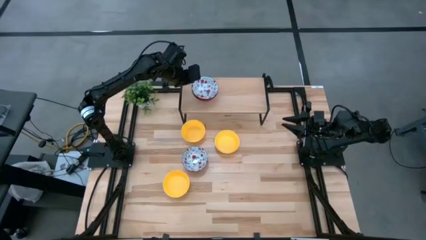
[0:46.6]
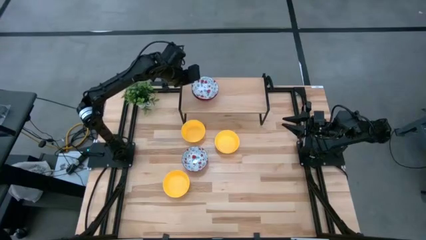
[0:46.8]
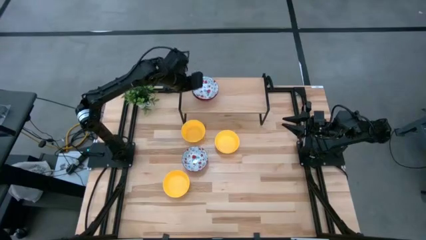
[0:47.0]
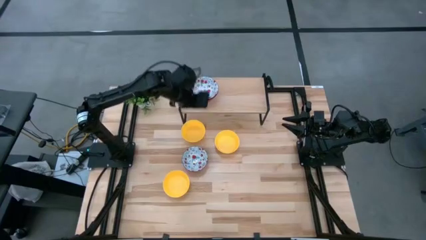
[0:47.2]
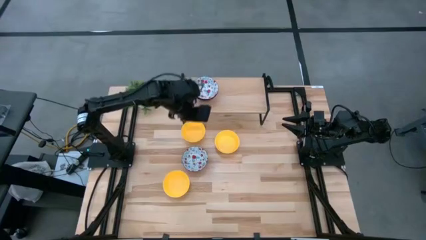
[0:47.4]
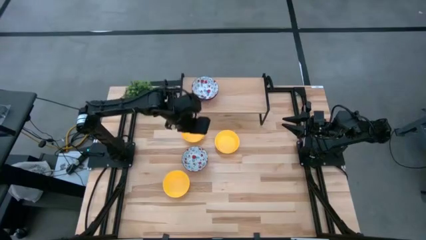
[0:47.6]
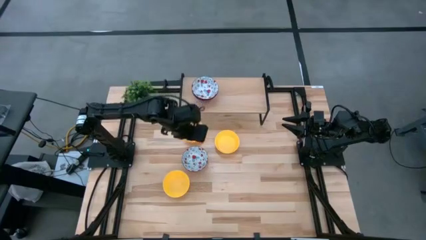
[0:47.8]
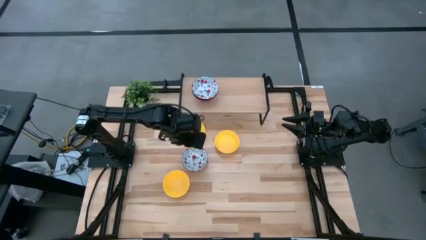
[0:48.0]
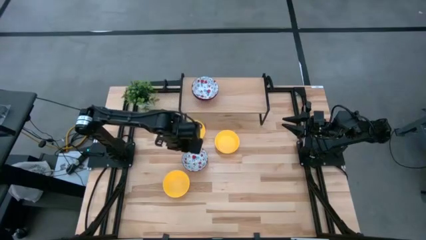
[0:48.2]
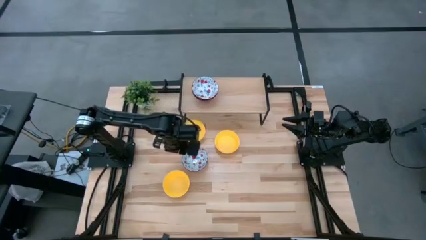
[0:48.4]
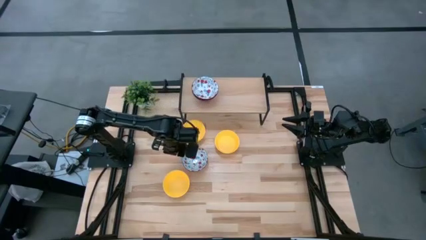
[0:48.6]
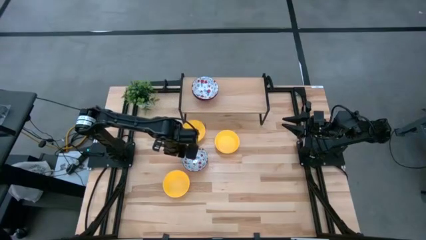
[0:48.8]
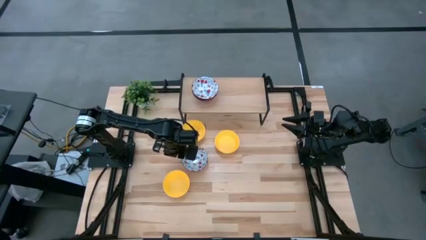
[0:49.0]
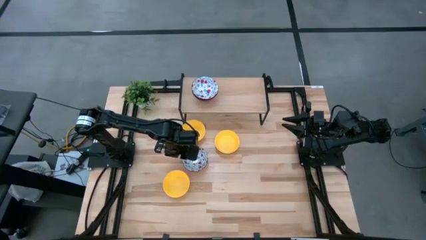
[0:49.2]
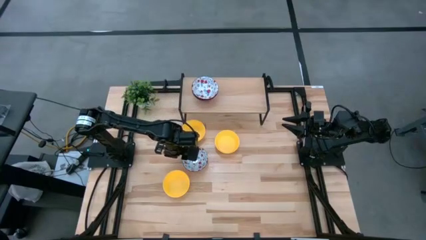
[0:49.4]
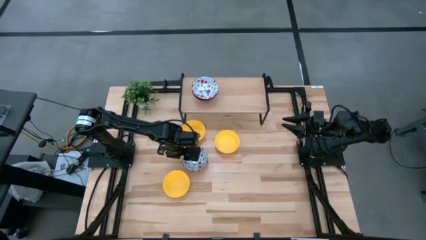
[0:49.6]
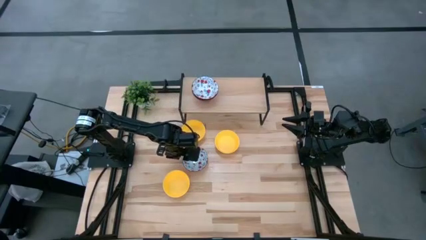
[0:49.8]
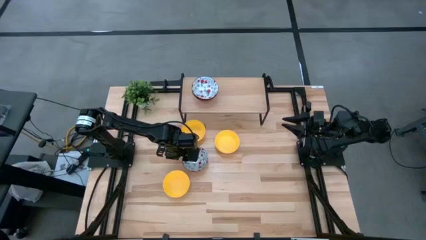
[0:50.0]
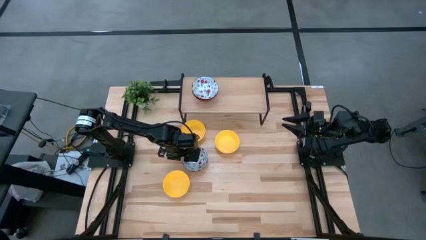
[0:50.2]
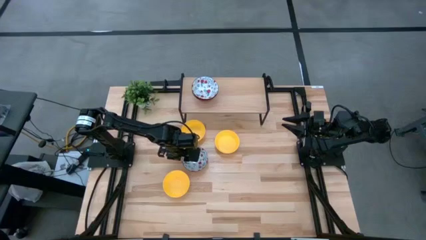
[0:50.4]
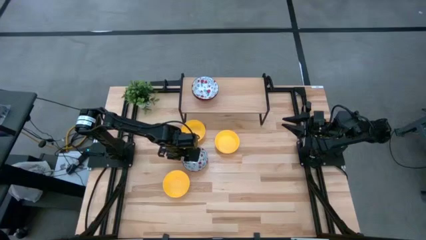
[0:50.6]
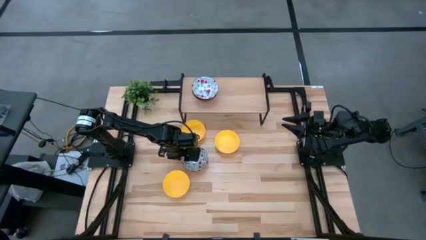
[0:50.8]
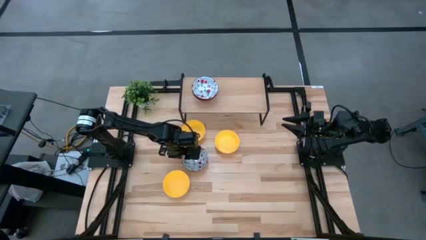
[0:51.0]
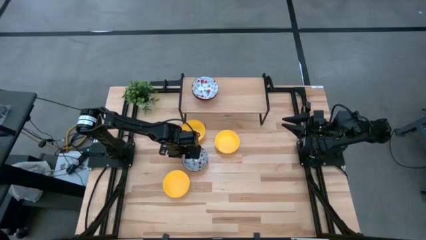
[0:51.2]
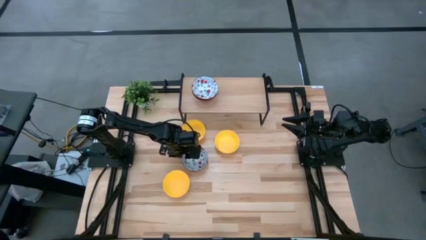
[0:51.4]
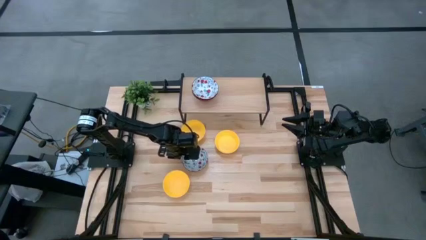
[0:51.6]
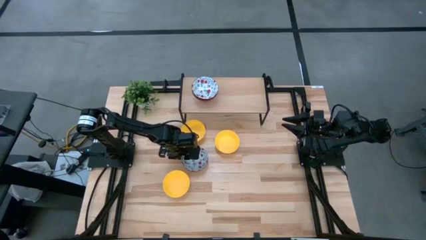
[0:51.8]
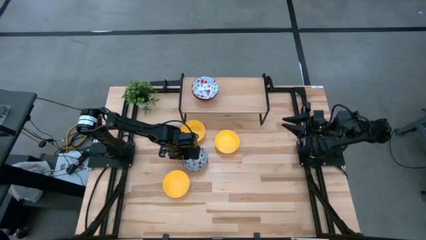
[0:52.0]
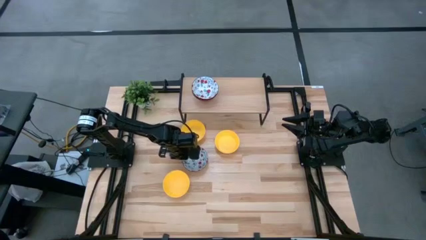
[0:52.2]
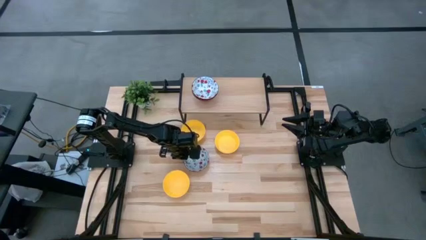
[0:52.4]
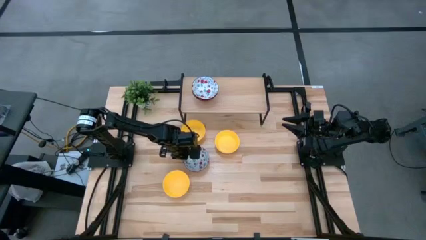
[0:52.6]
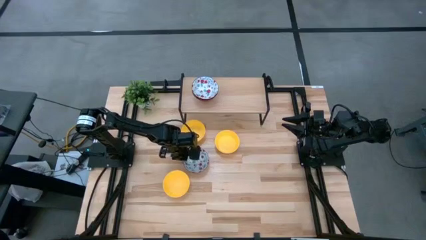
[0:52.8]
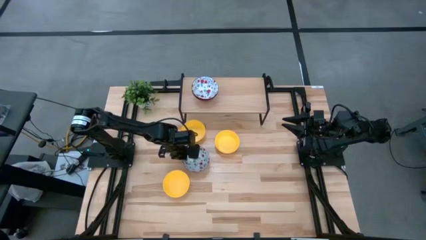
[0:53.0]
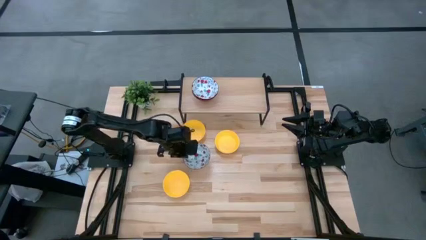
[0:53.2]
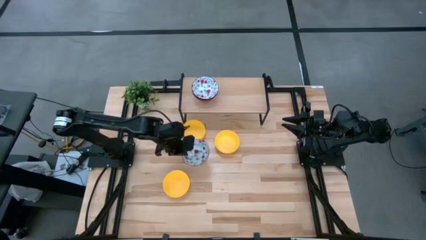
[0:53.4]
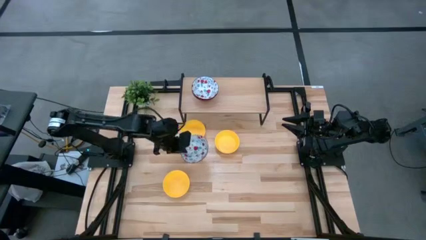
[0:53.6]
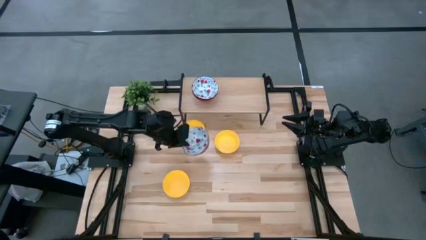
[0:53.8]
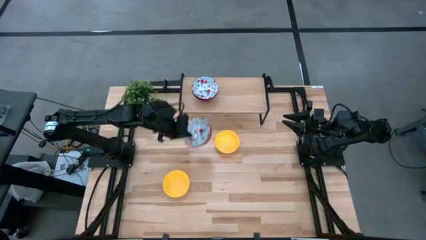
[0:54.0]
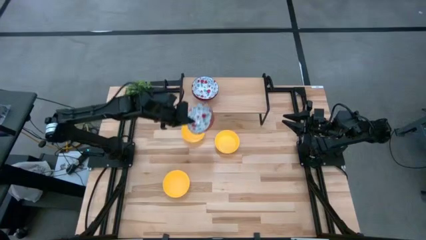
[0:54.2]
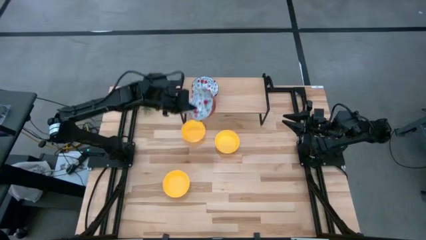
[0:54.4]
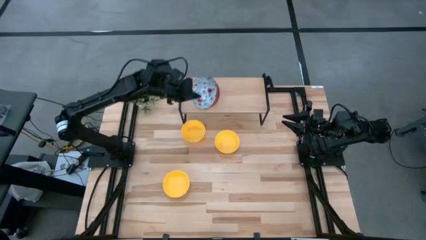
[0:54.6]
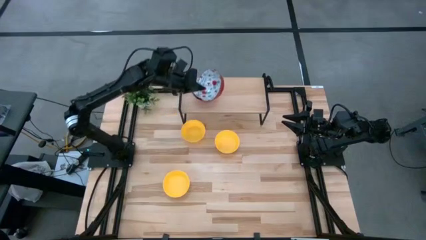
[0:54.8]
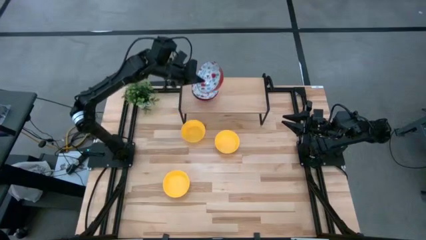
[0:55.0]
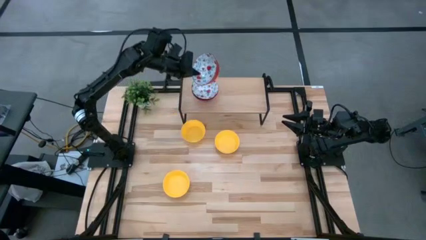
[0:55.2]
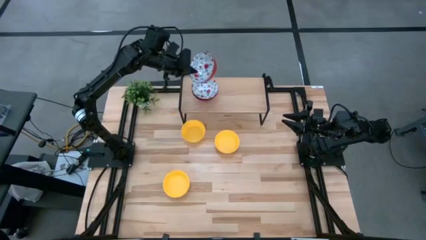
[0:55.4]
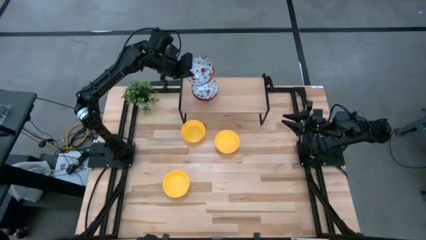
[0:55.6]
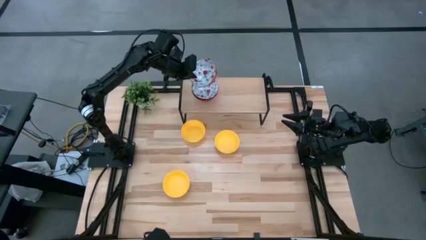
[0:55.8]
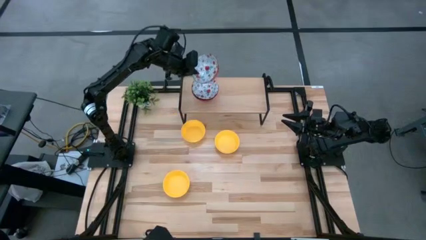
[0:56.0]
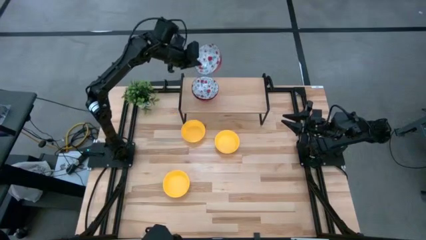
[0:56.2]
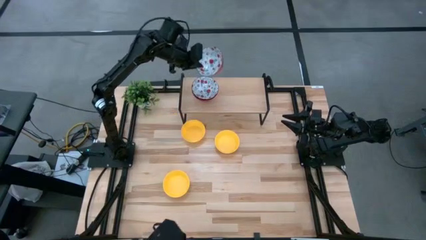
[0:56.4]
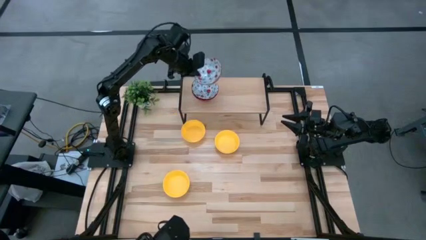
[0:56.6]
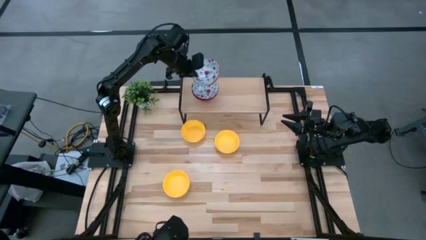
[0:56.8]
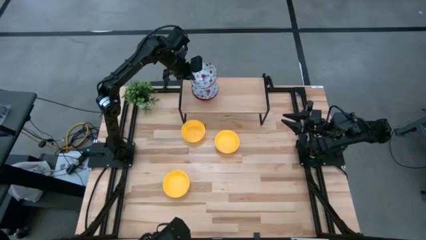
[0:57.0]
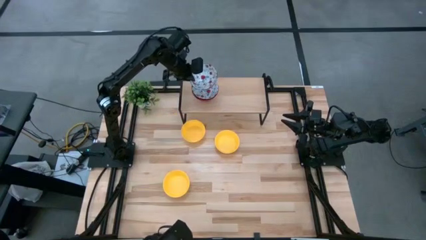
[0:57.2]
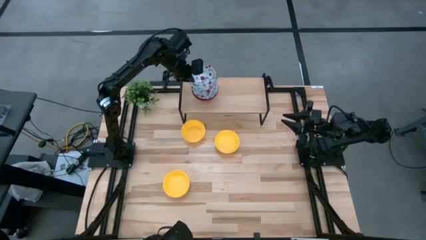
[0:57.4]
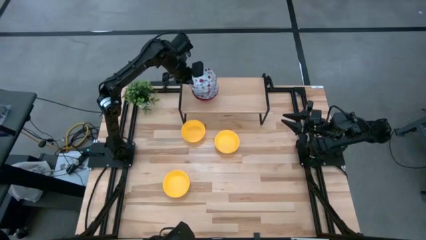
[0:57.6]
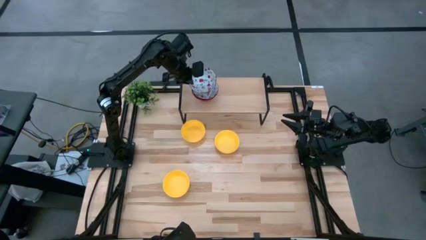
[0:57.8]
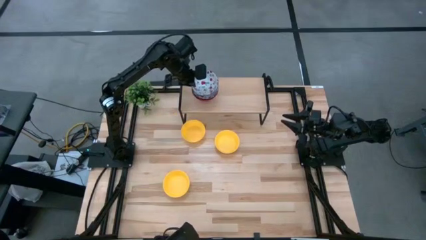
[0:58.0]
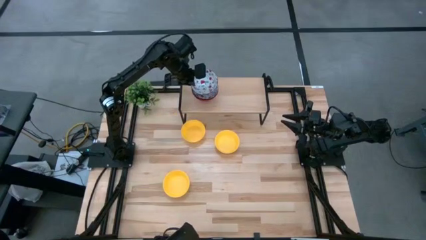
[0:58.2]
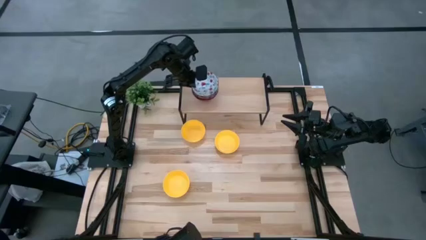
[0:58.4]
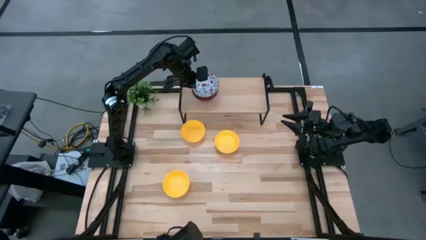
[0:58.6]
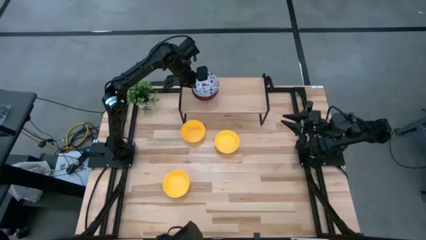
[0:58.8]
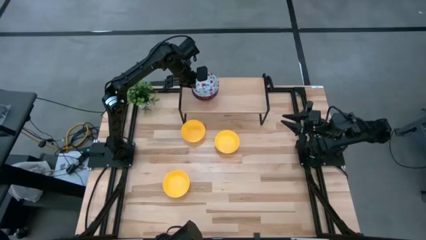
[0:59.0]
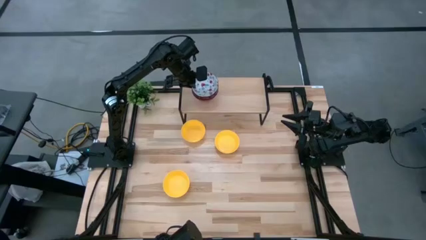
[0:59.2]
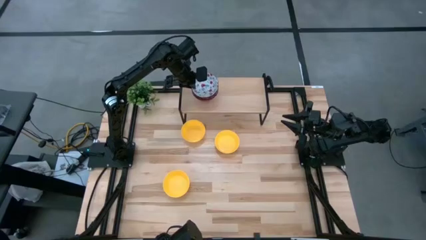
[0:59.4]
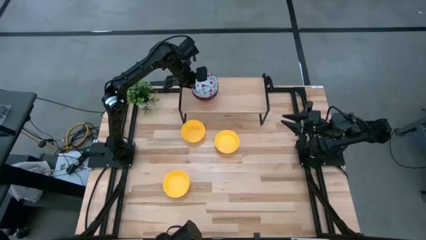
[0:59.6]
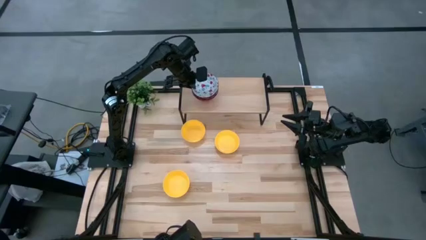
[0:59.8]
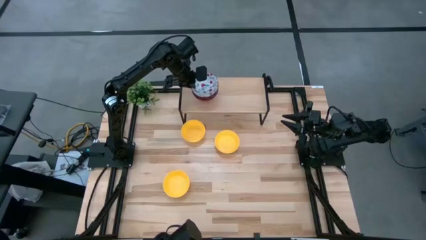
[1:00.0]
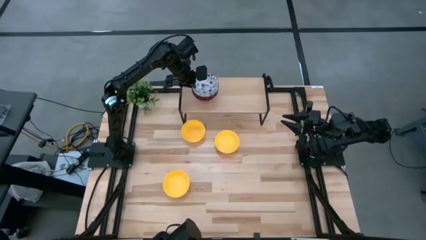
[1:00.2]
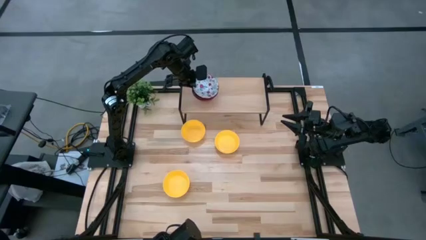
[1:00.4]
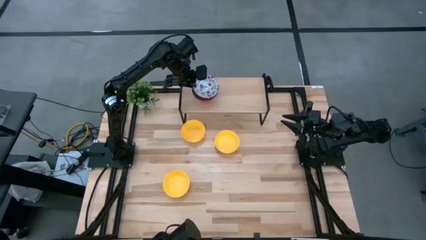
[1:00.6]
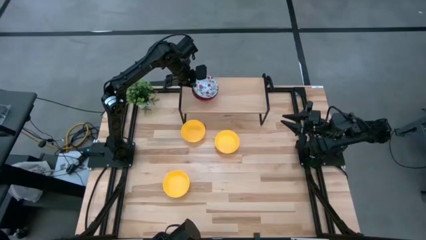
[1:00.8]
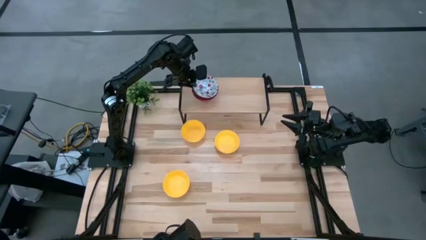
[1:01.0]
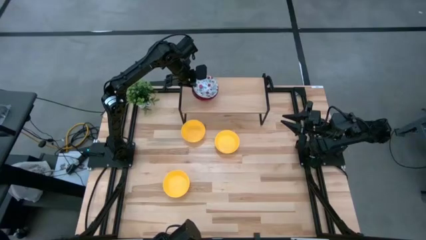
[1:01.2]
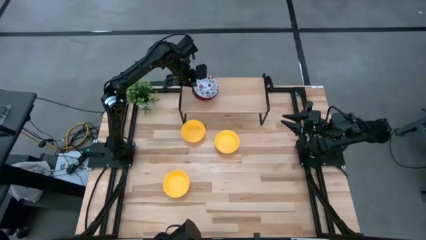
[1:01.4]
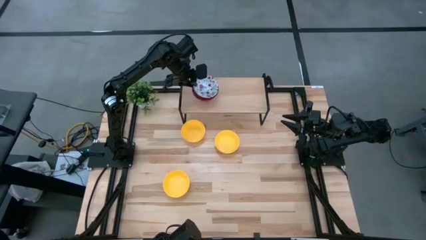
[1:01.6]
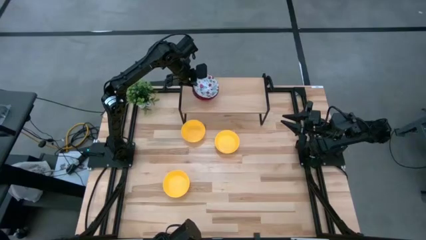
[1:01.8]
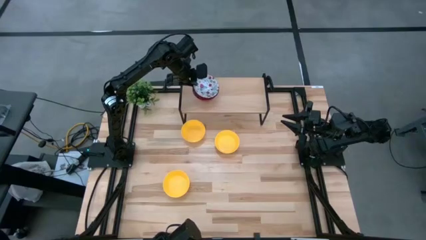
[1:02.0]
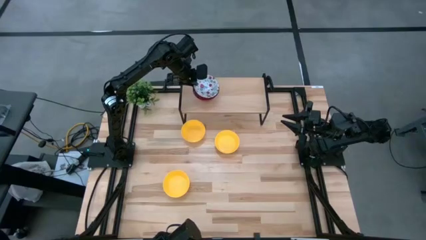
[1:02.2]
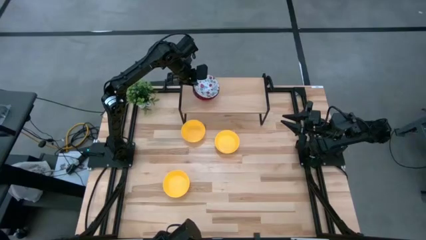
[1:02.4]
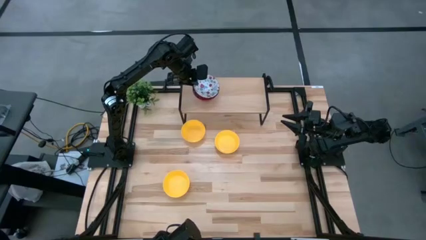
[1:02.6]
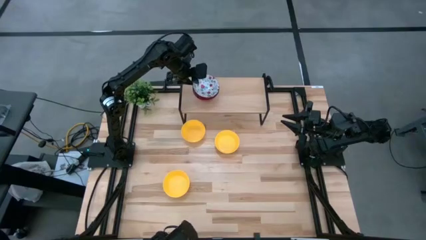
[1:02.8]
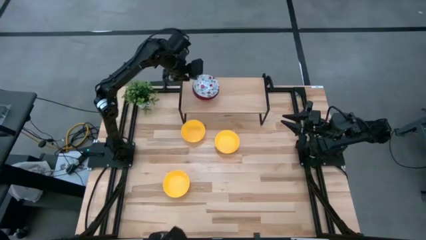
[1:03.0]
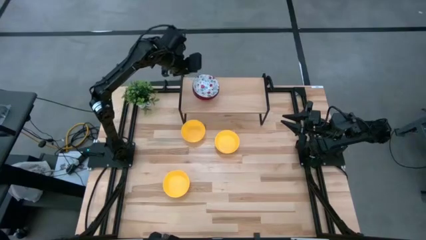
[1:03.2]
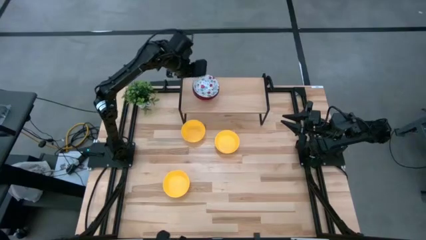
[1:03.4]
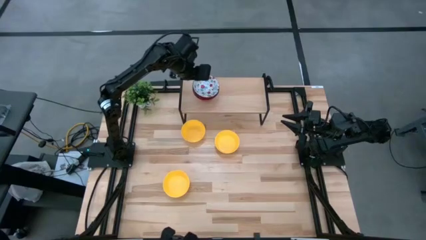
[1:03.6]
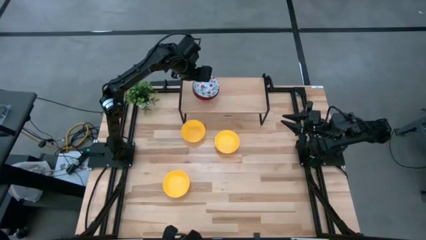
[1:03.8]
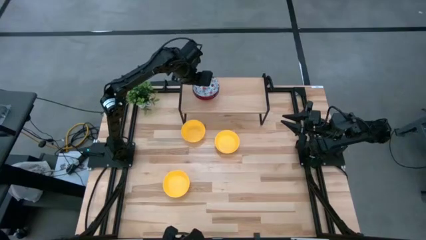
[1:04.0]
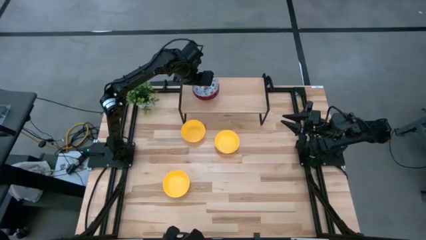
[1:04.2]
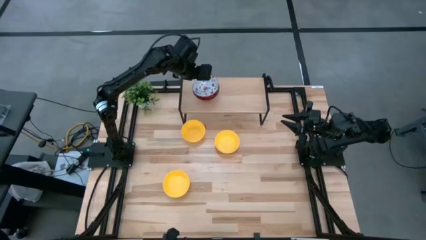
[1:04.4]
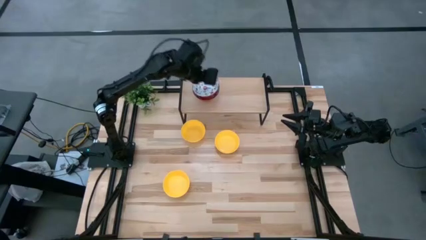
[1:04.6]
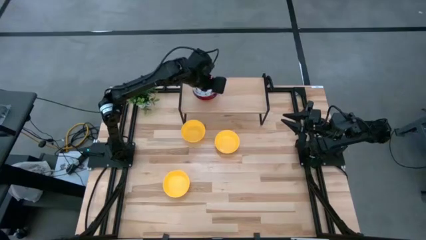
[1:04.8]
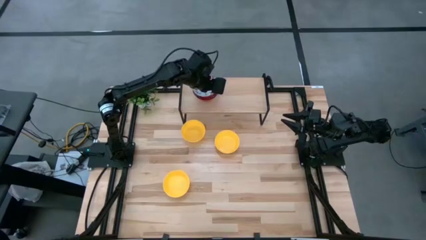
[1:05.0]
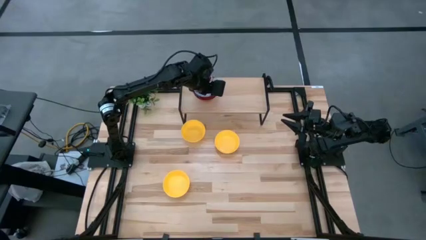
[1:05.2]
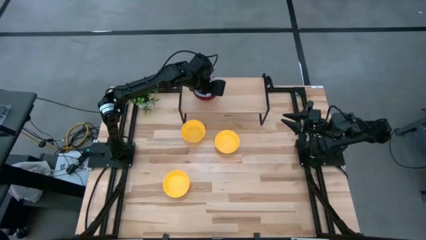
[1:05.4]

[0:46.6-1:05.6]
Task: Pick & Place Mini bowls
Stack the white patterned bowl on top of the white patterned bowl on the shelf
